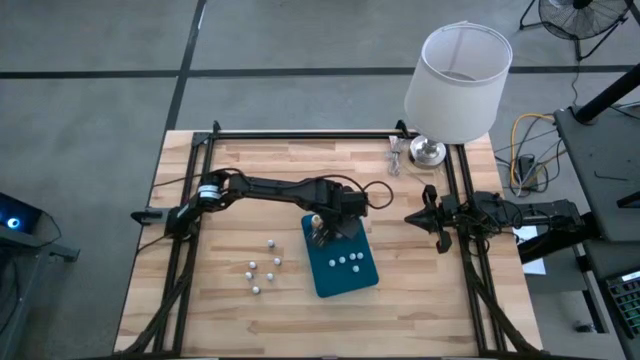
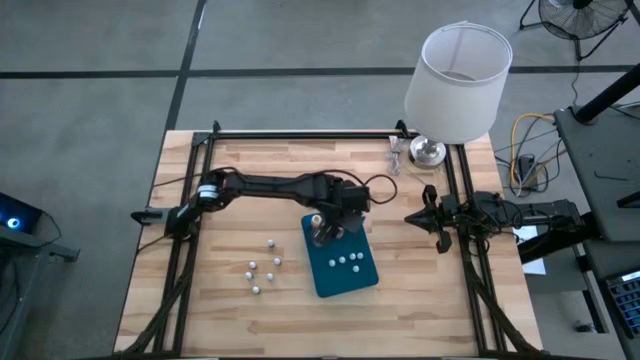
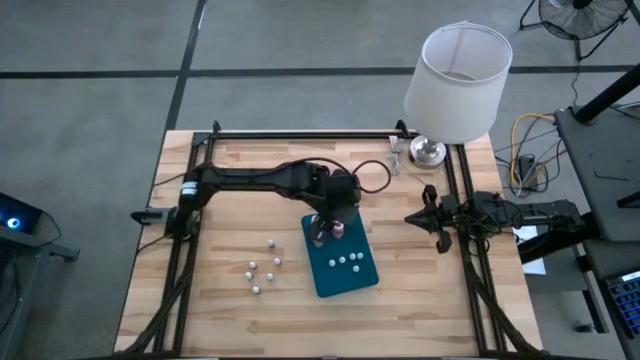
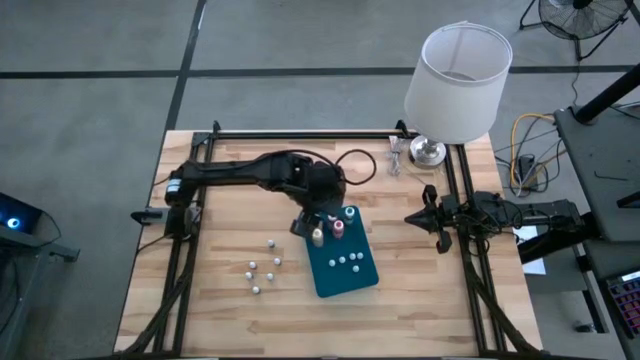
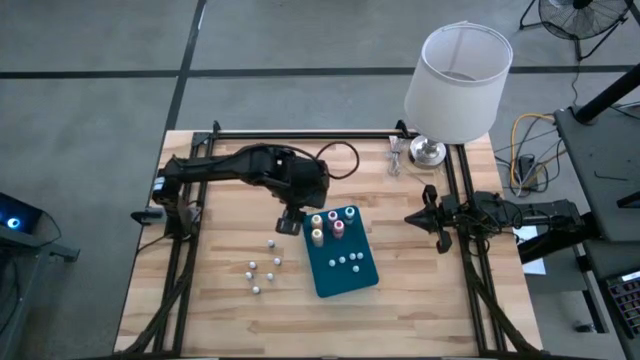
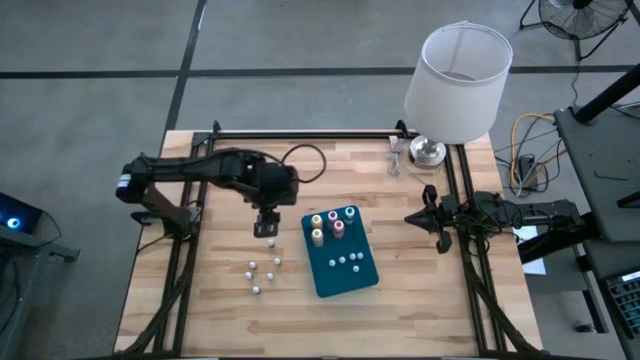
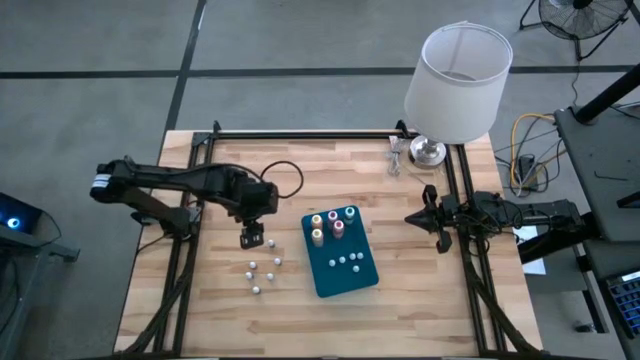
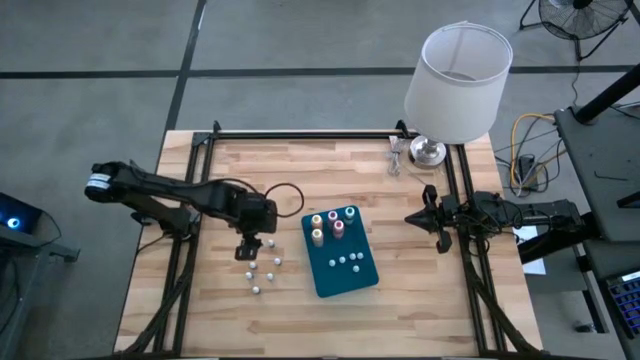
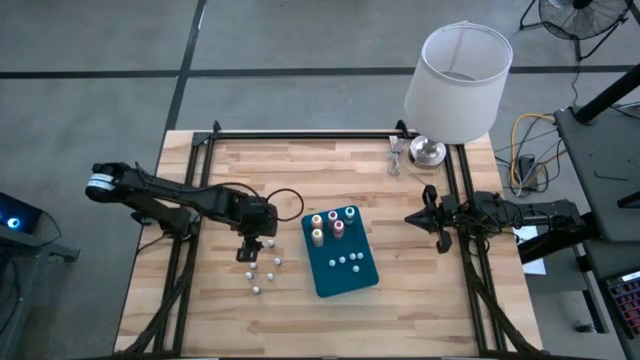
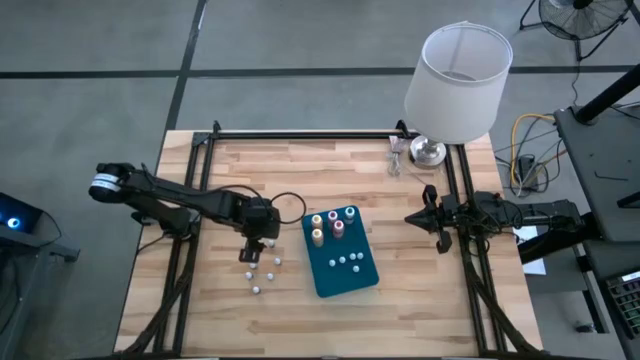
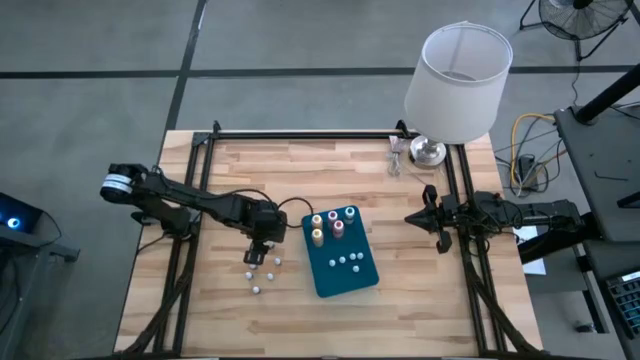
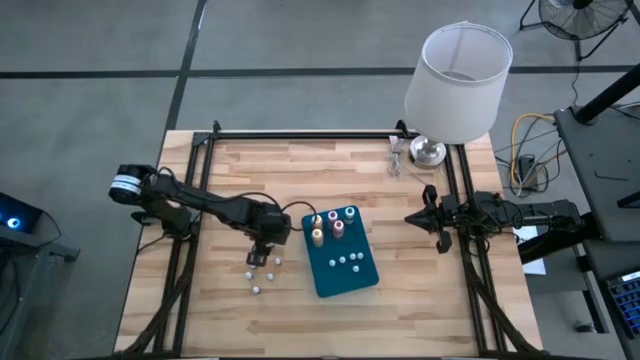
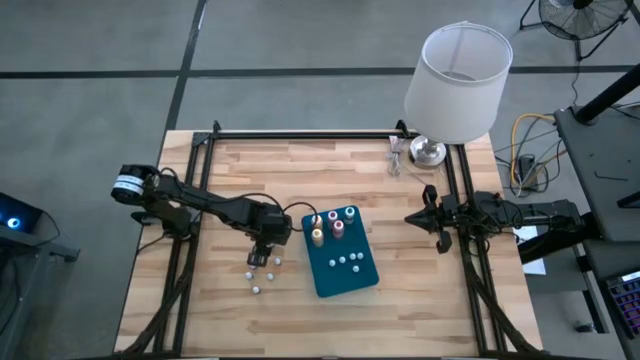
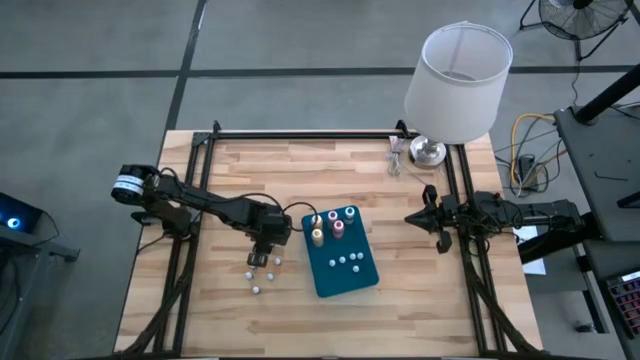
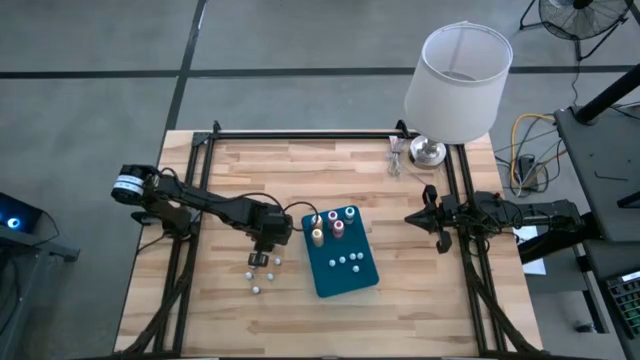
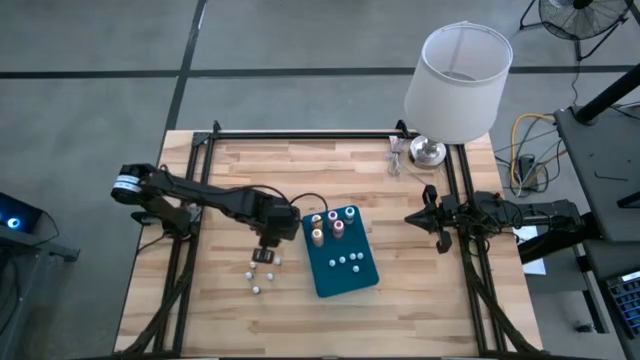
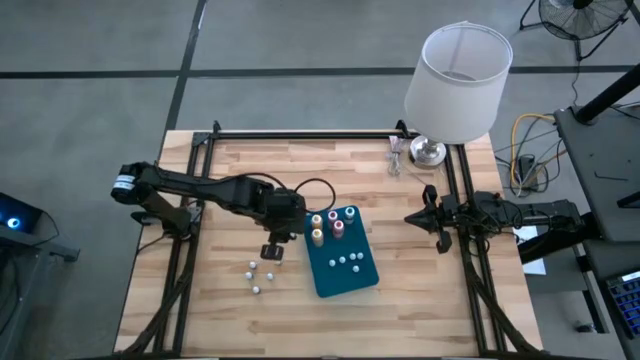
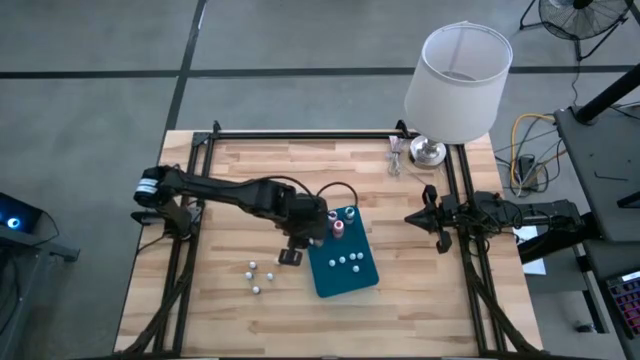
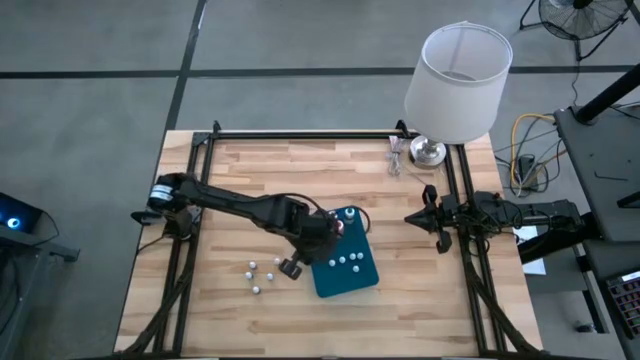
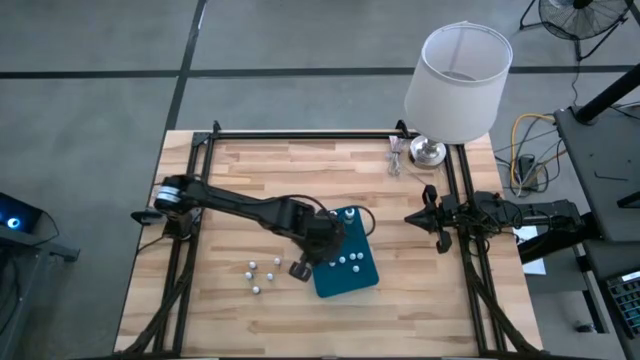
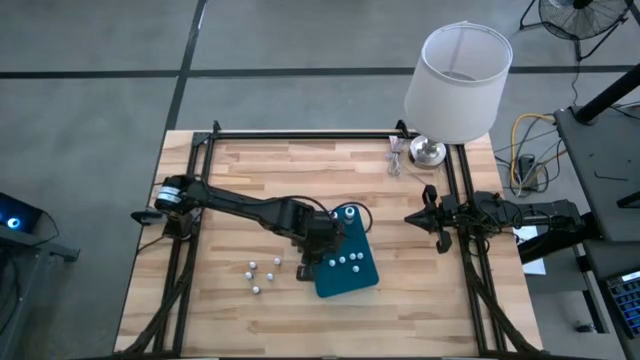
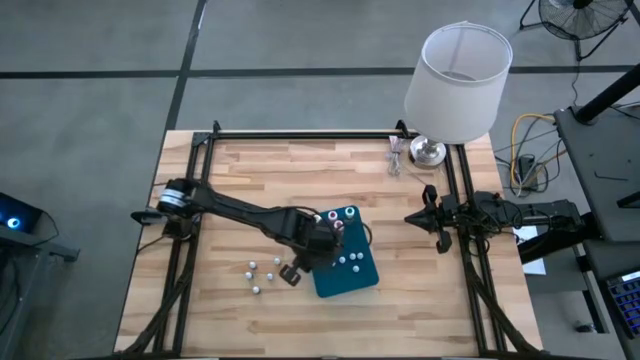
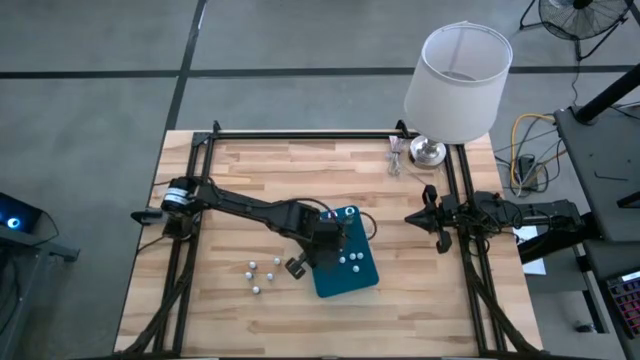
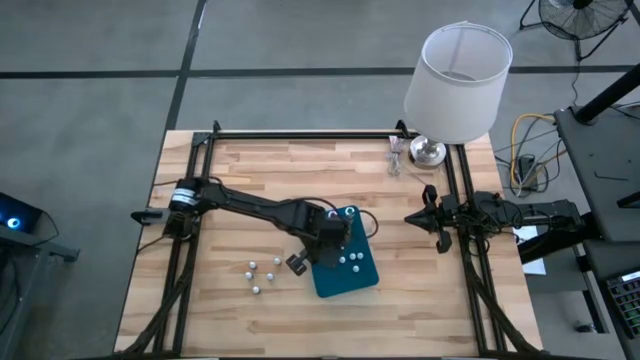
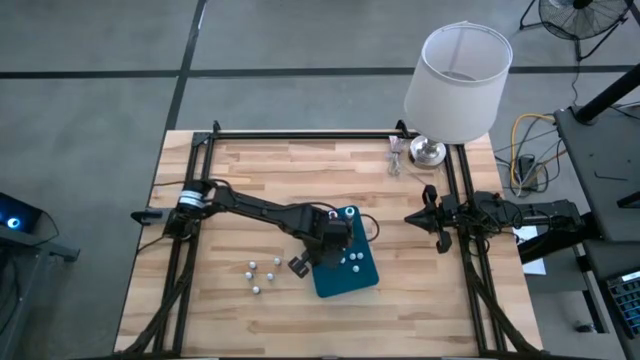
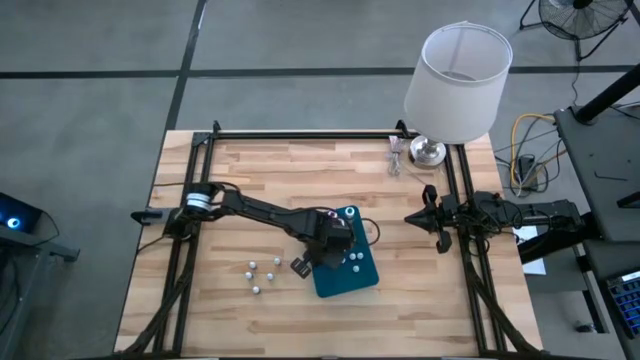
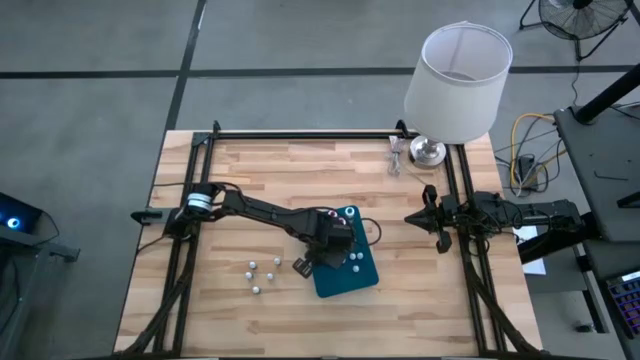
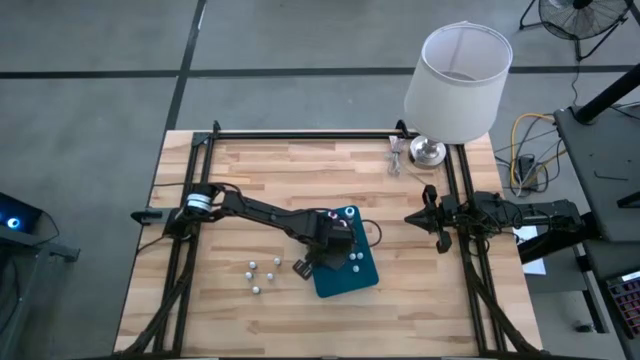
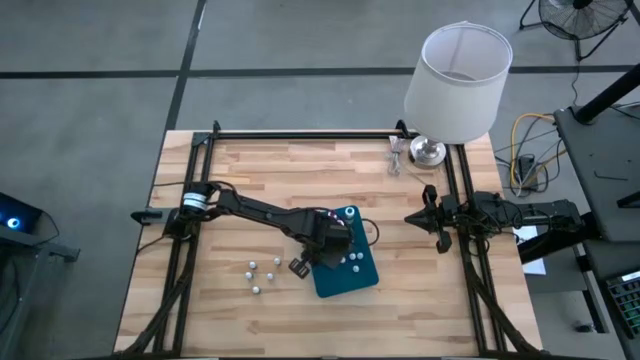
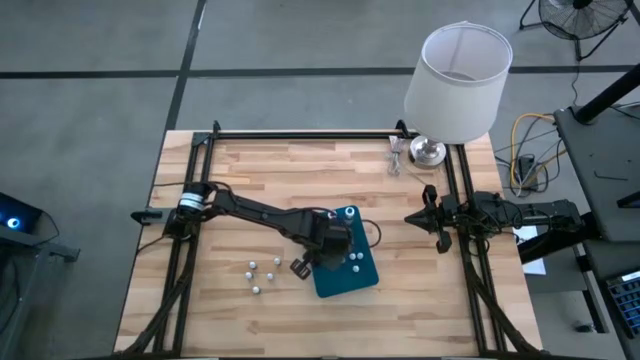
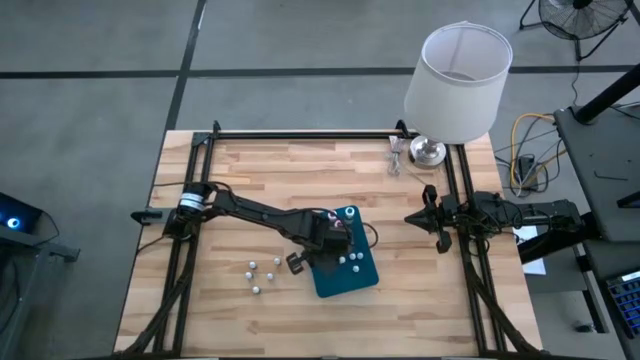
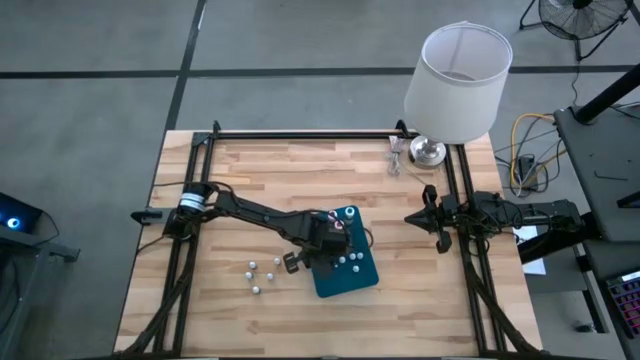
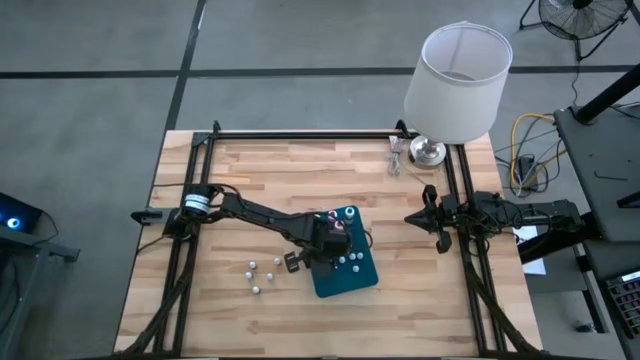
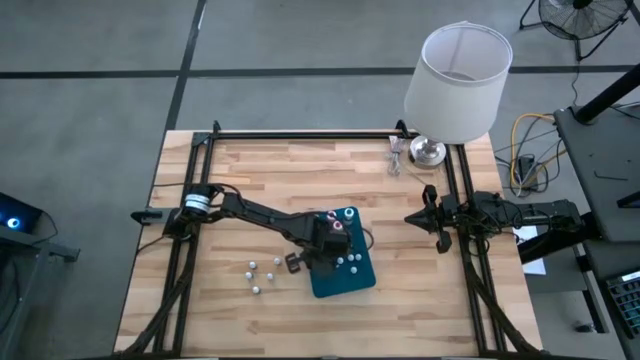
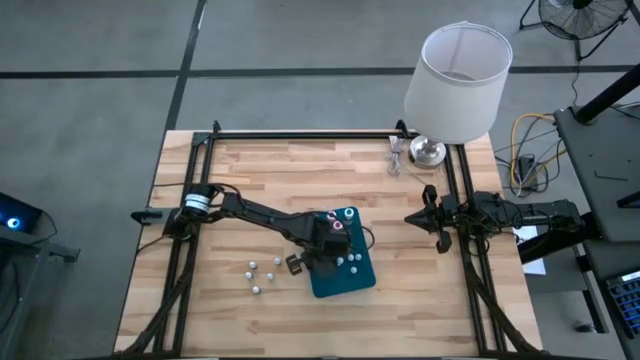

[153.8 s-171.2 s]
Task: Pick & Place food coloring
Put the small green food coloring bottle into the blue bin

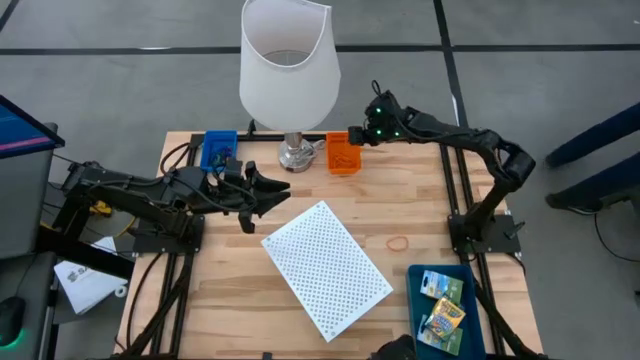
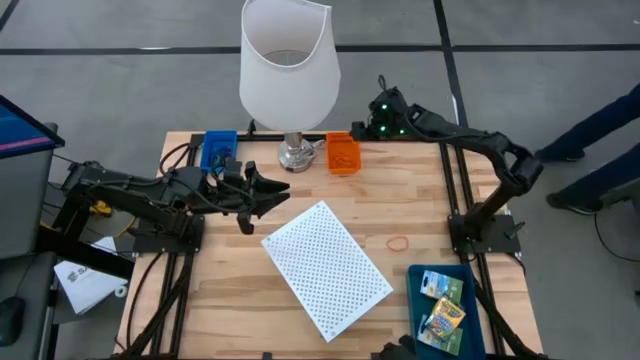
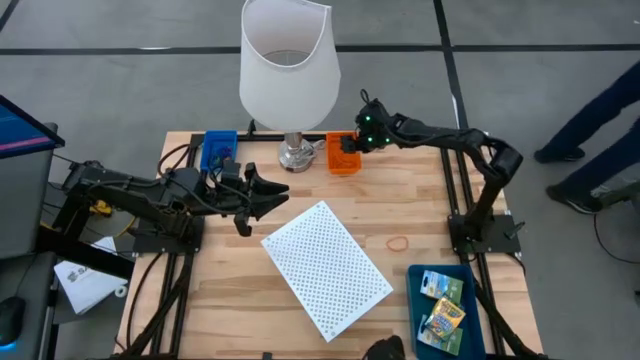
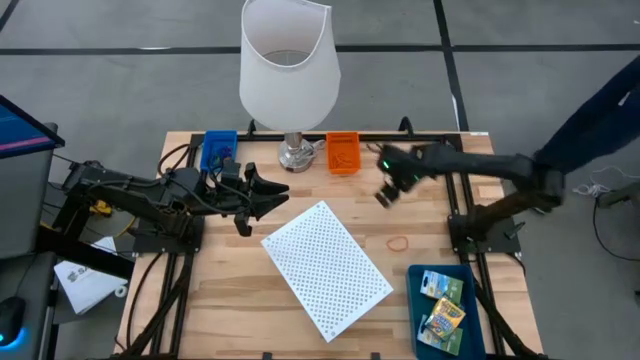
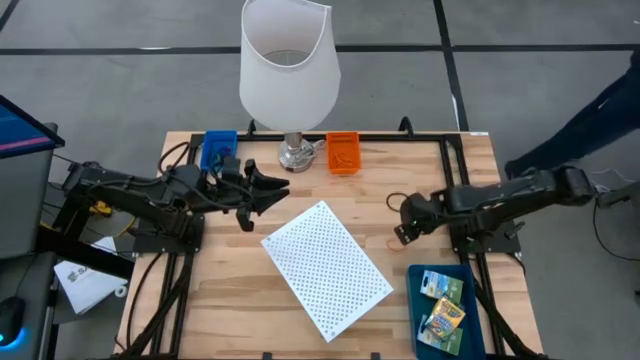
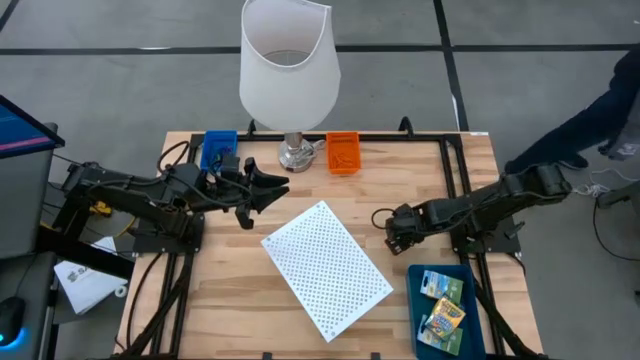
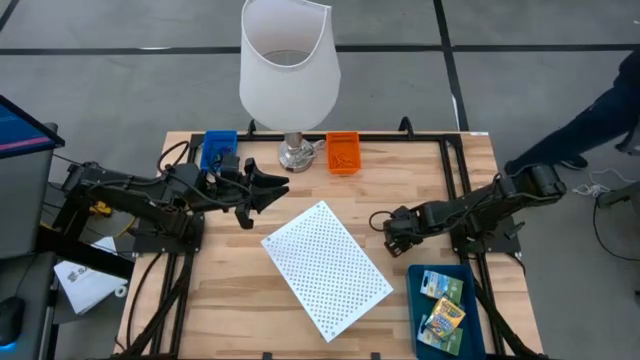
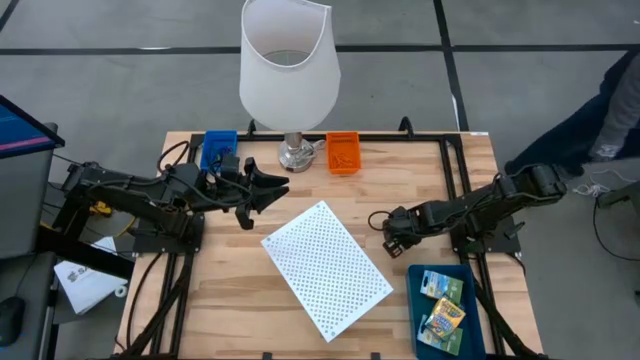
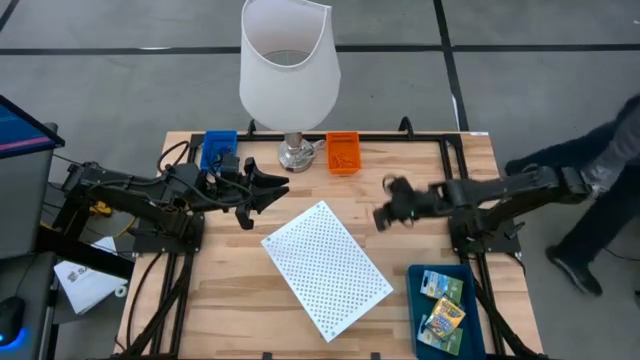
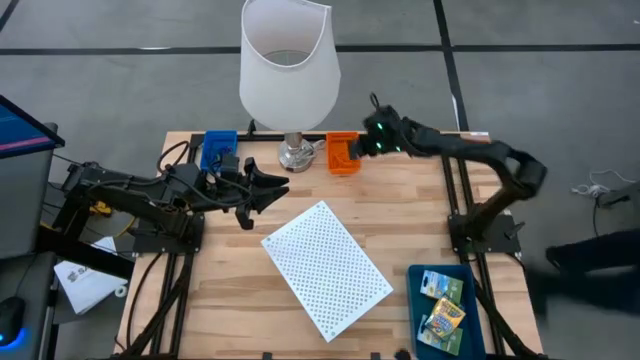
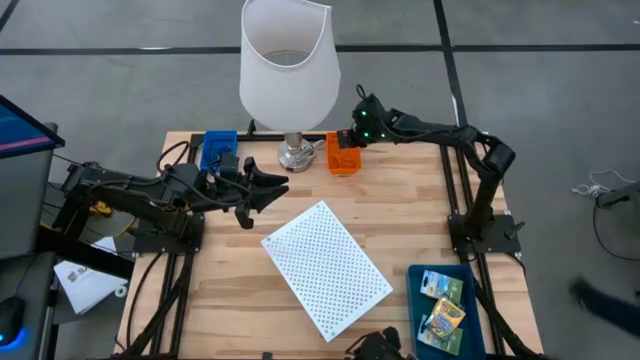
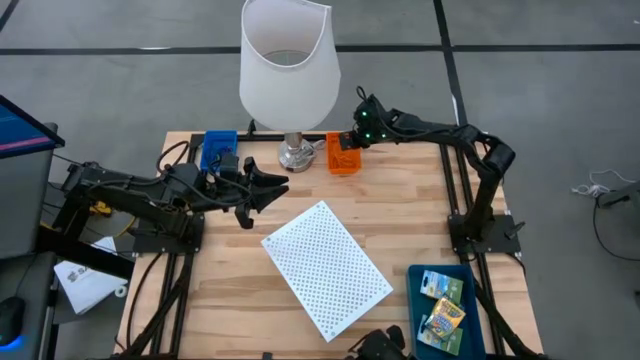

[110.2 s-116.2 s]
Task: Pick & Place Office Desk Supplies
Put the orange rubber band into the blue bin
